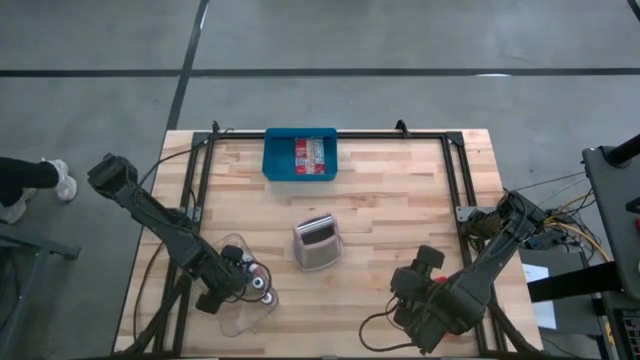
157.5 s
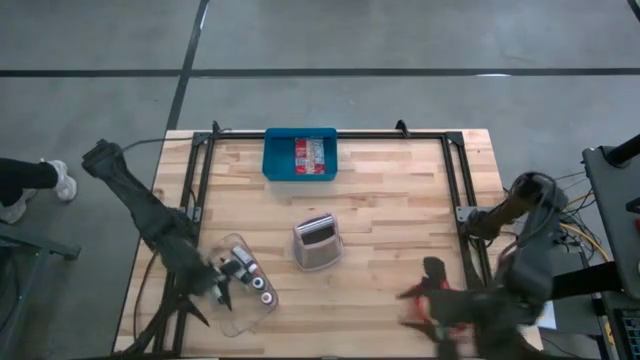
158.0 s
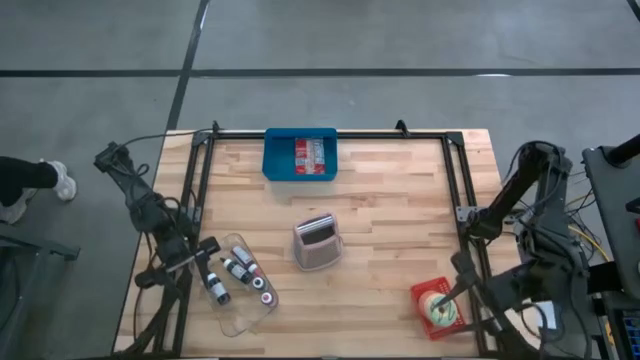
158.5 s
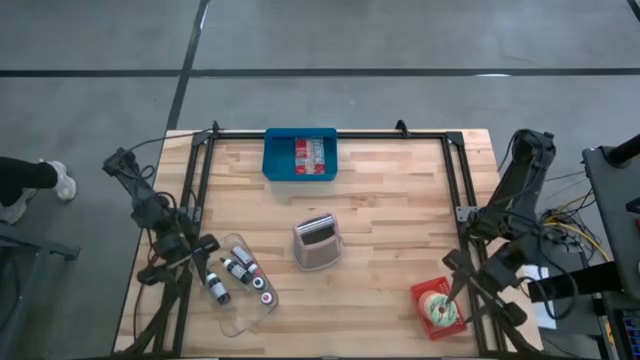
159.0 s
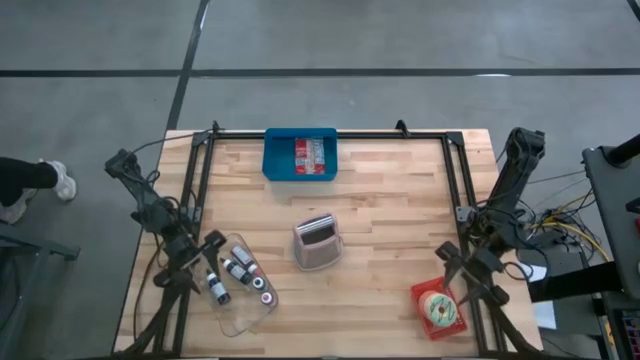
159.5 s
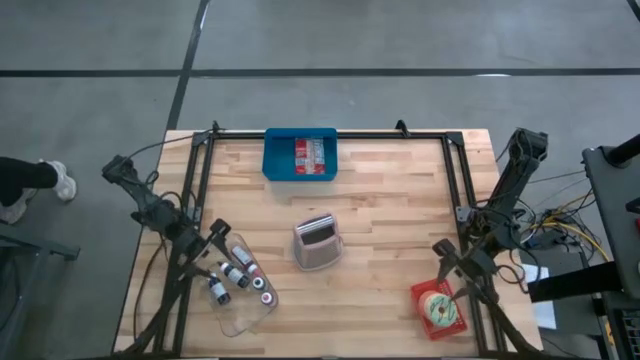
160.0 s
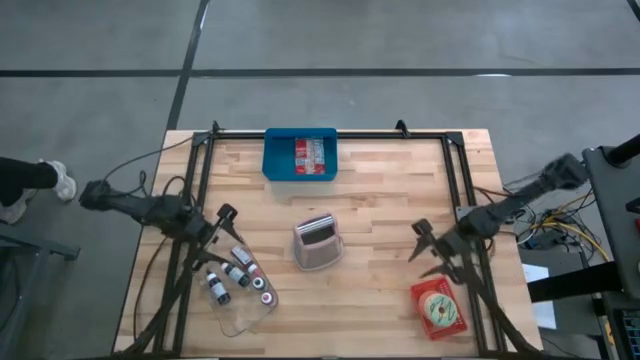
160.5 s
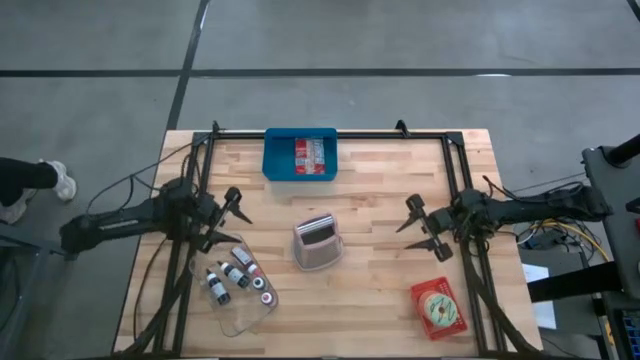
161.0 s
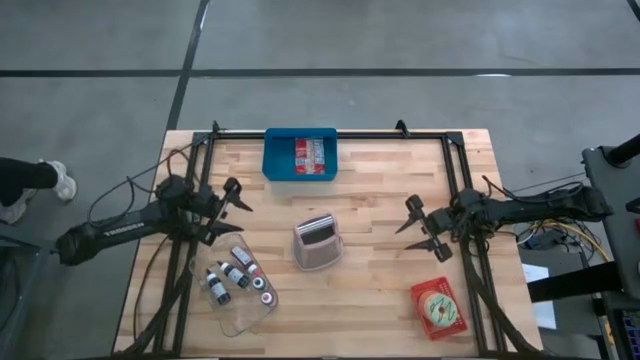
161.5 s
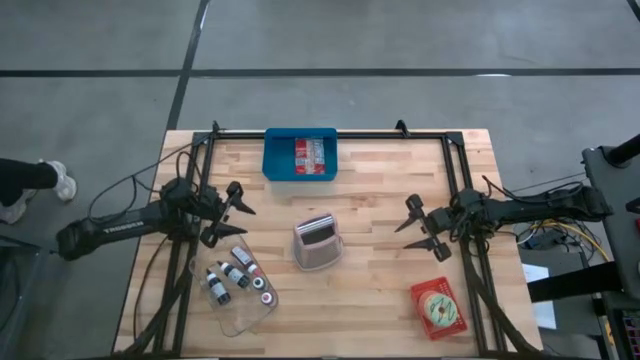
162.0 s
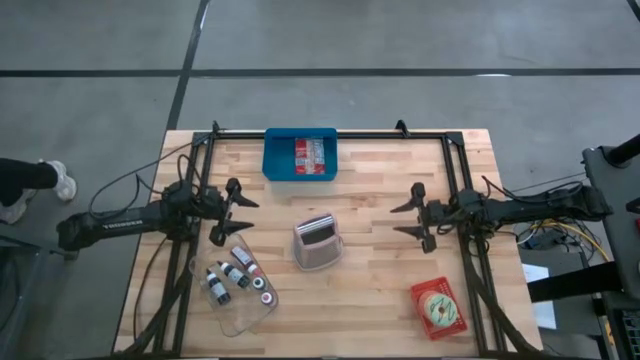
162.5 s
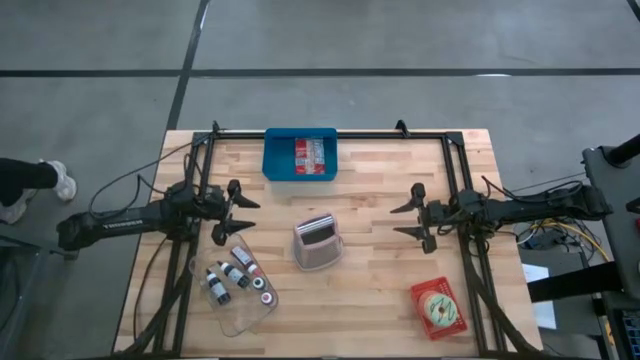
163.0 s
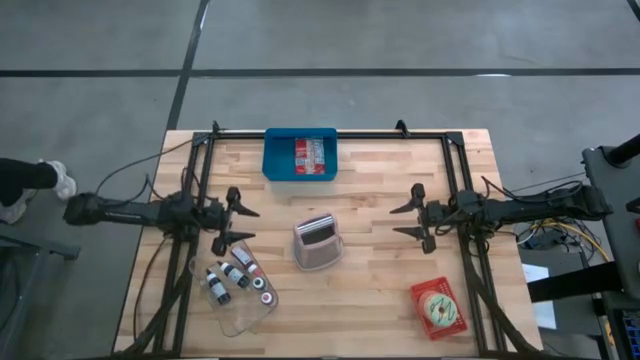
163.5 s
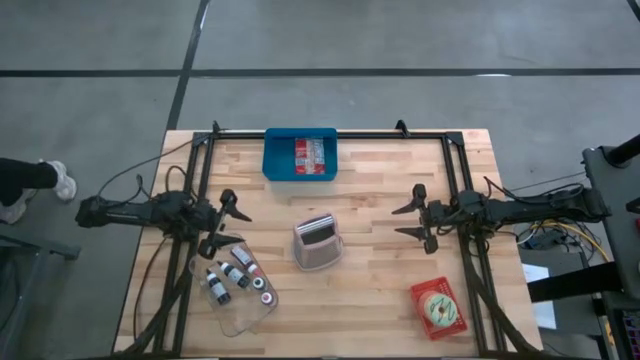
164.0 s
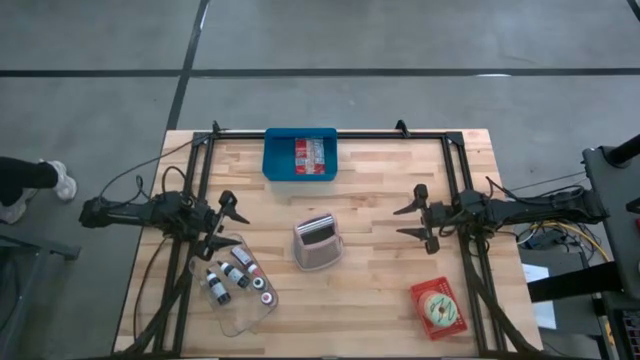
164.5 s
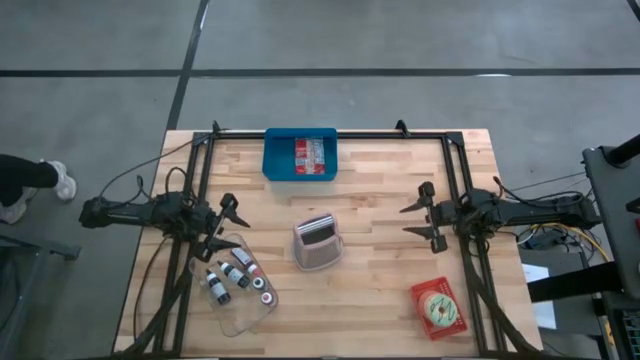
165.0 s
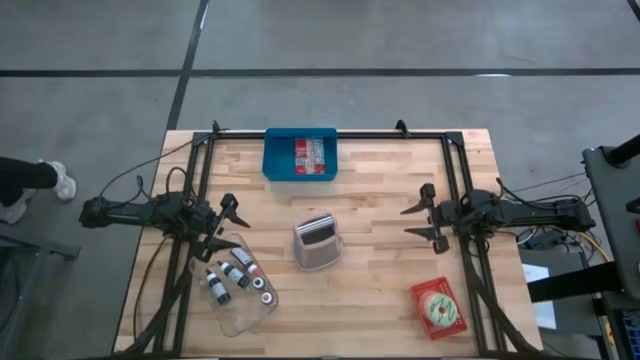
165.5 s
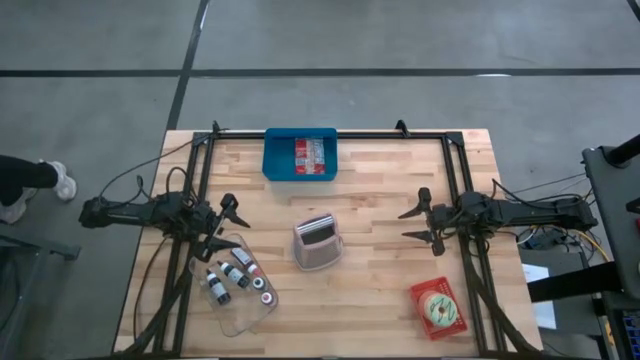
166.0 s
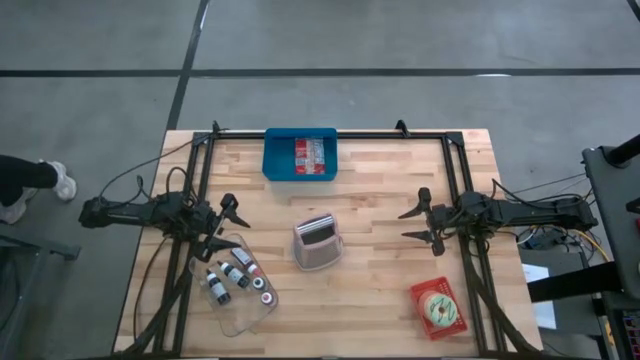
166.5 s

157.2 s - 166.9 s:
Task: Pick & Place Food Item
Return to Home Position

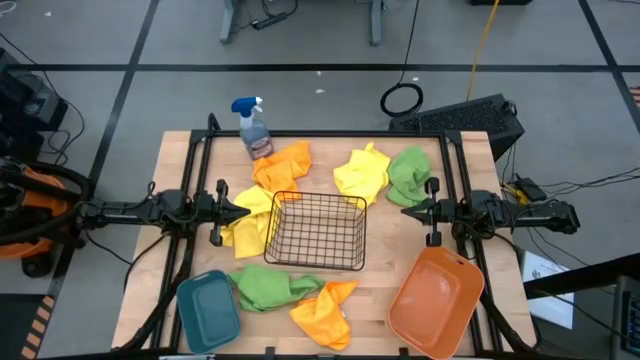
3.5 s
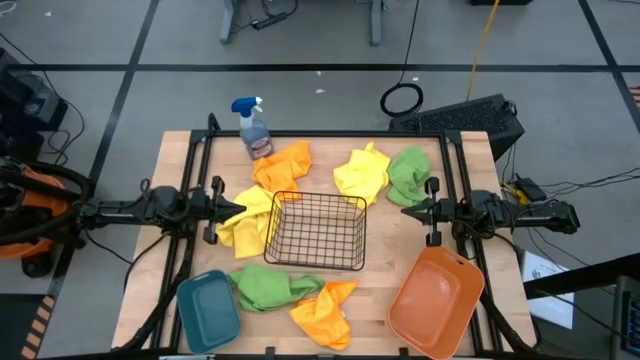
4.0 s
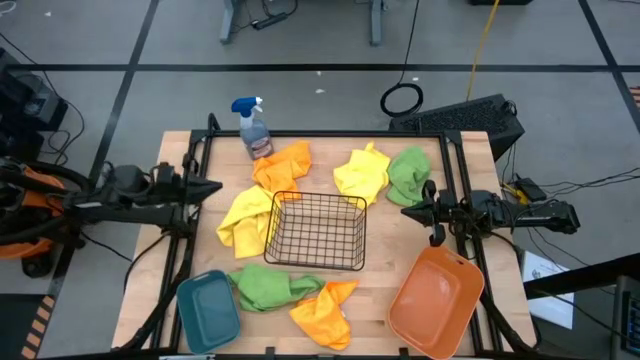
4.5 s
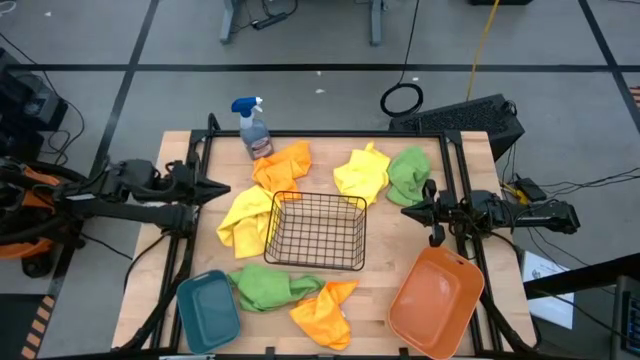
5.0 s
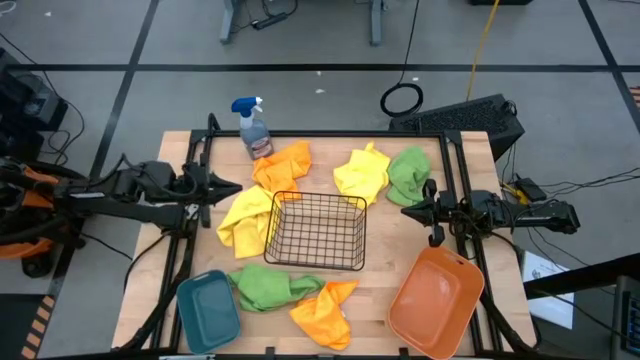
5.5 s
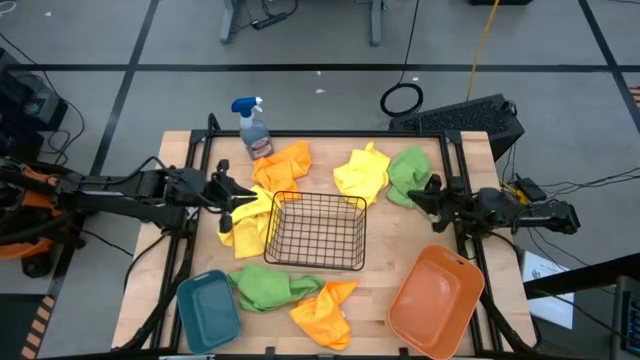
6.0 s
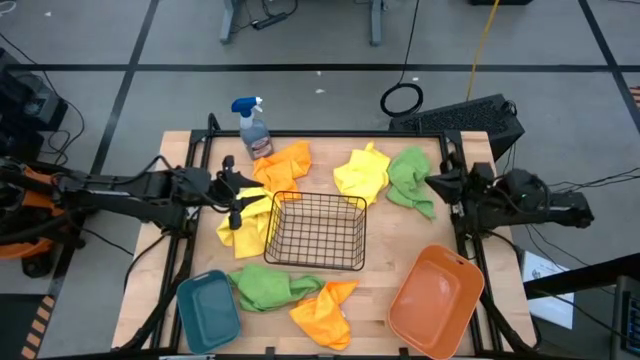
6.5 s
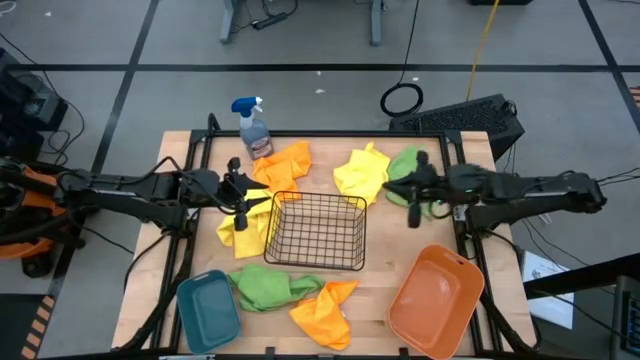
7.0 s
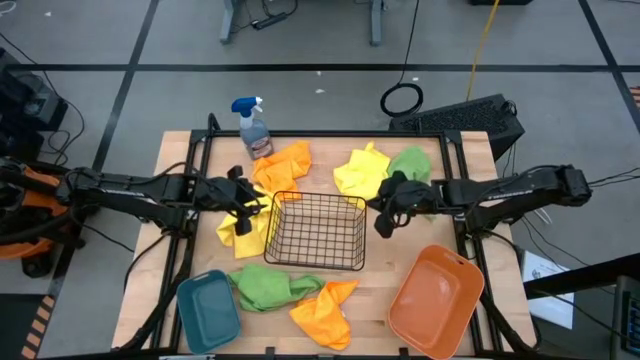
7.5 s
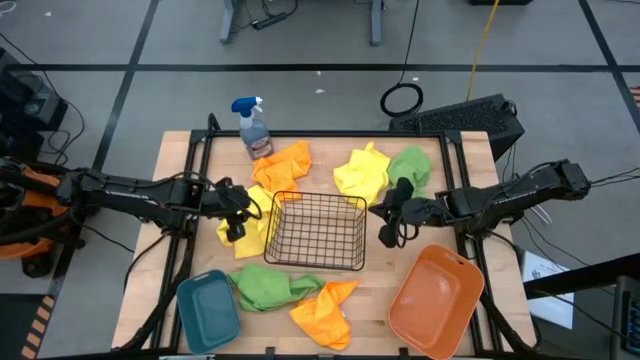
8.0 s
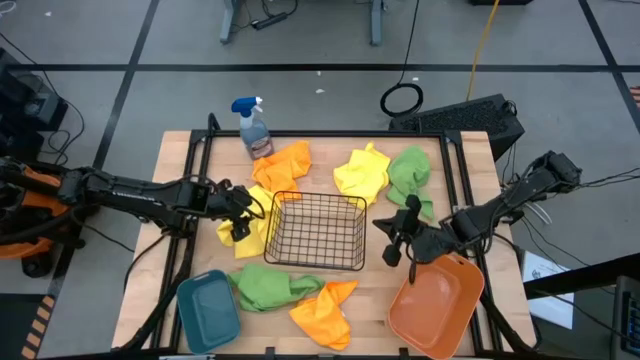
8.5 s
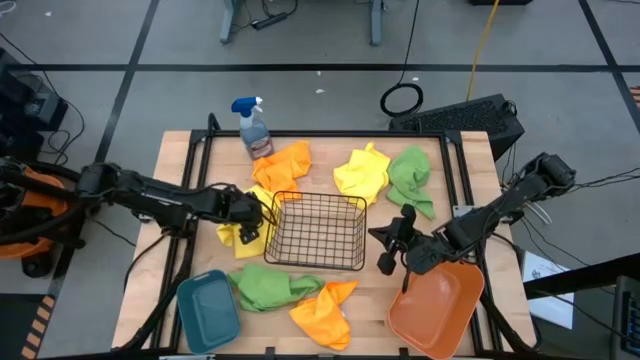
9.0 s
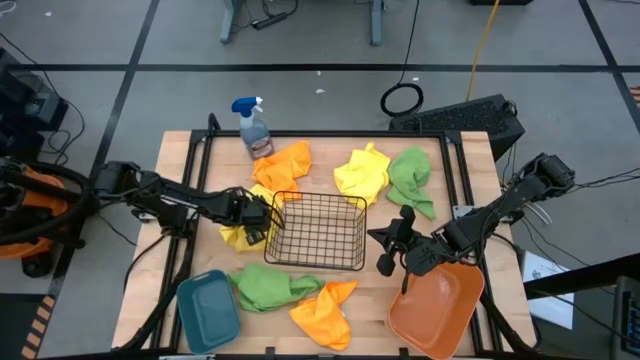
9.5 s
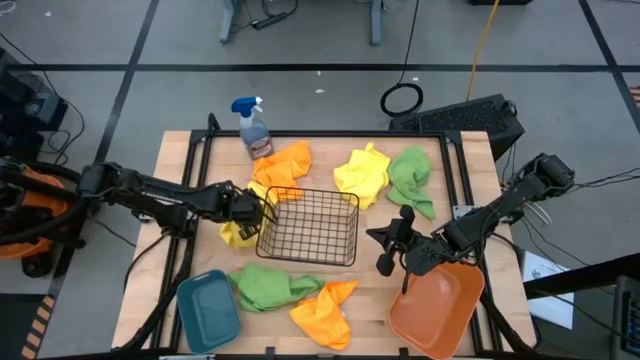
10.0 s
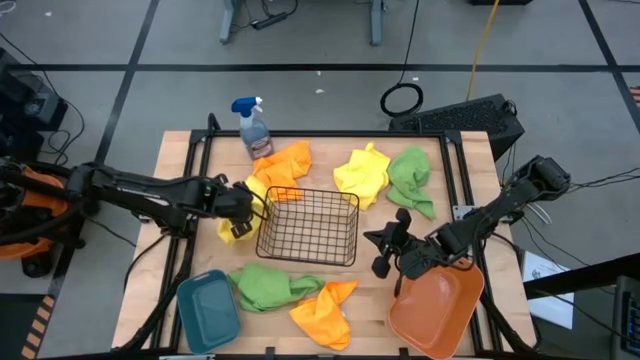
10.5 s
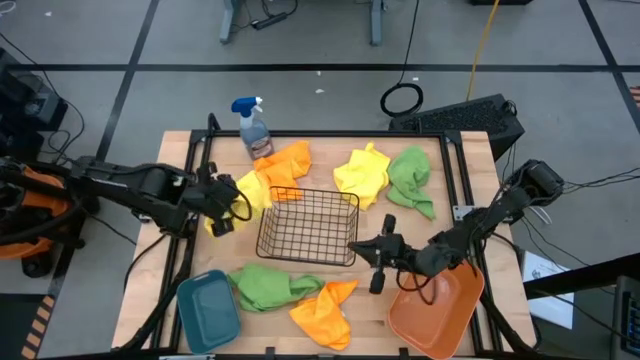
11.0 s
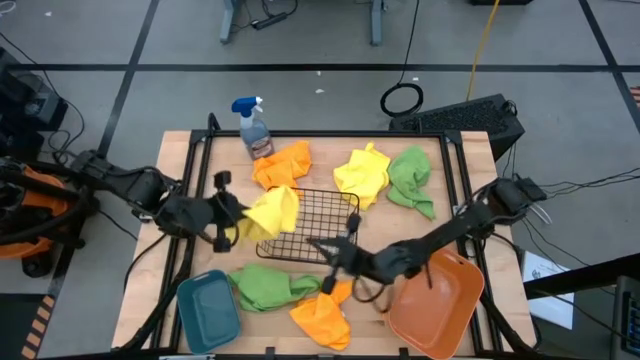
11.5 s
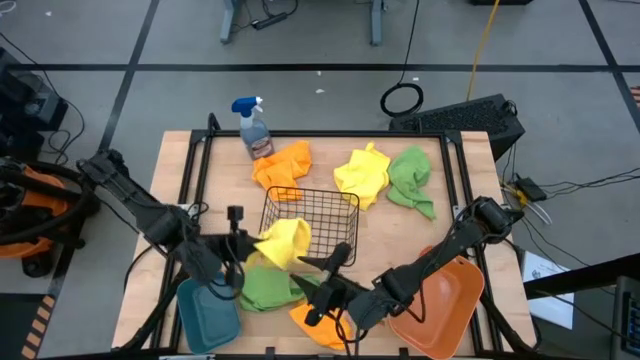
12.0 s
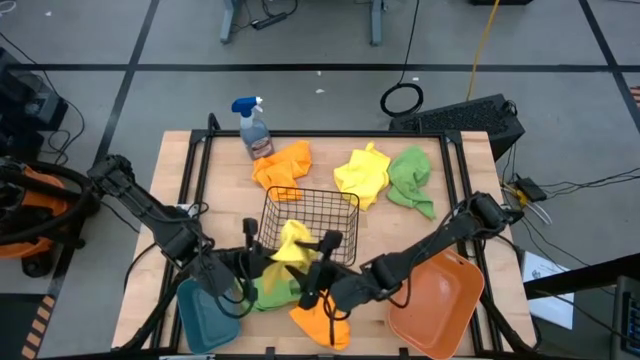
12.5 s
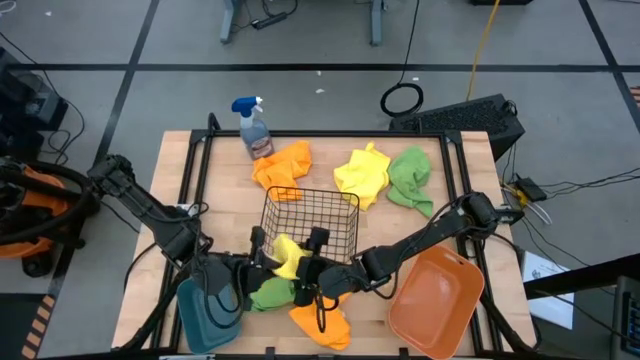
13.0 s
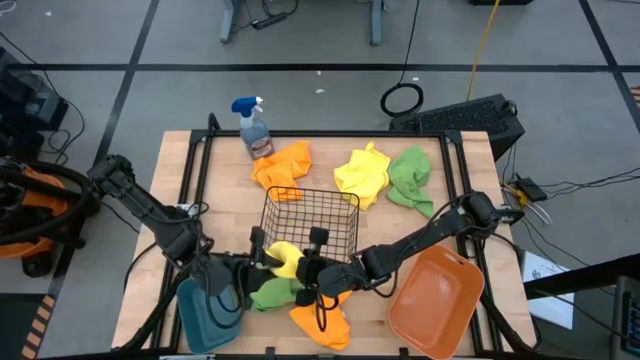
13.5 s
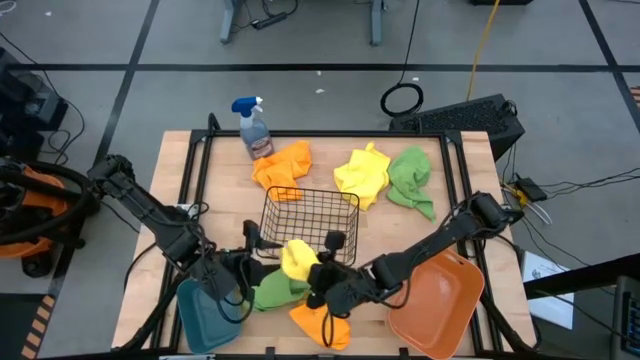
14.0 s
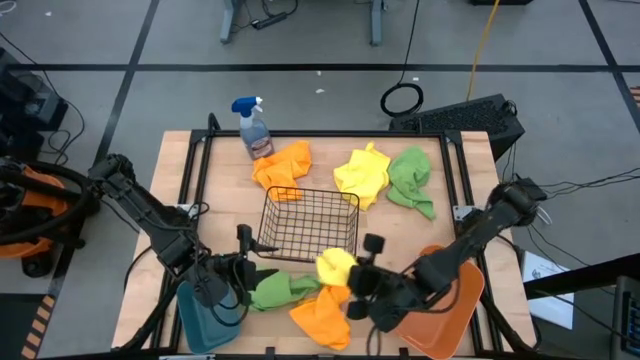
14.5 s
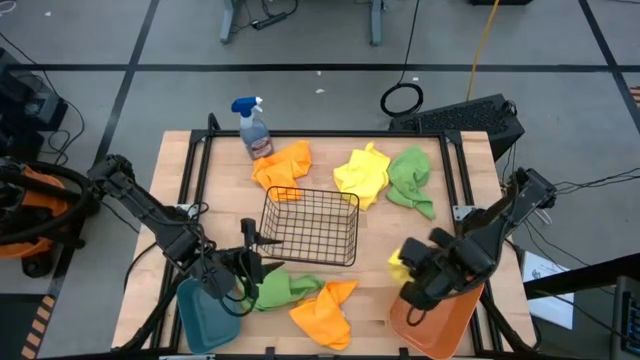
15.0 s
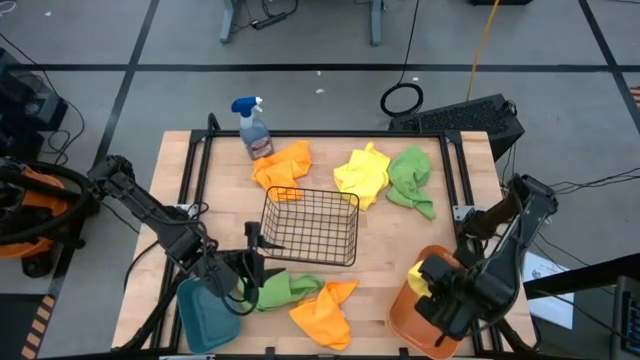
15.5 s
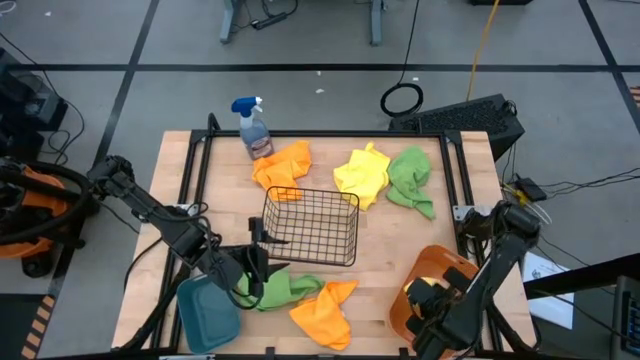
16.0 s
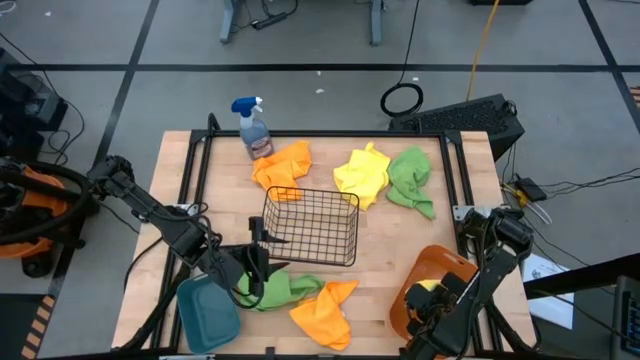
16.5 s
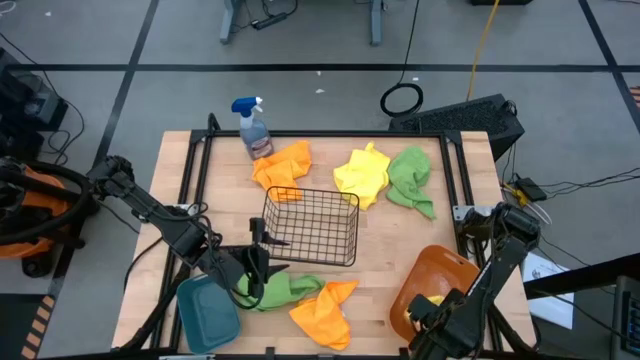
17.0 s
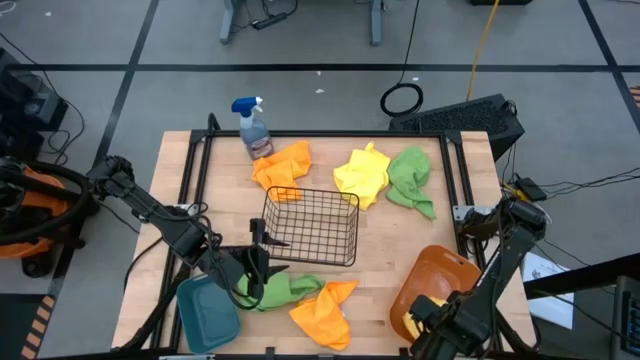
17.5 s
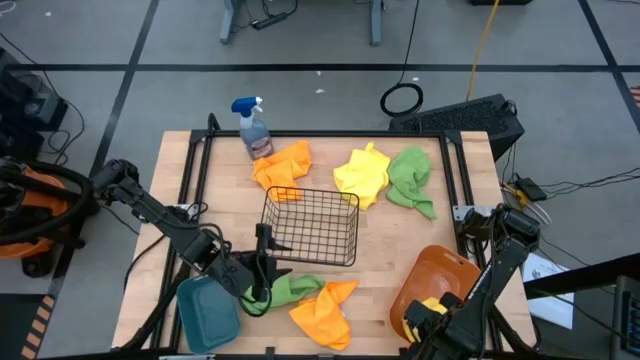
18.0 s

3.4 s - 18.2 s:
Task: Sort microfiber towel by color & place in baskets
Put the left yellow microfiber cloth into the orange bin
